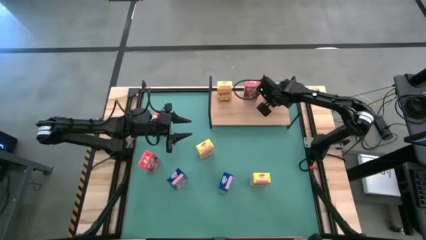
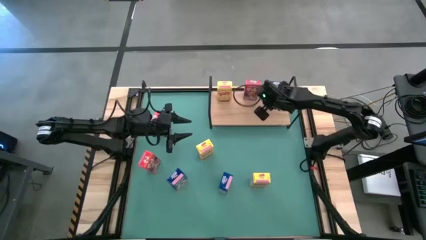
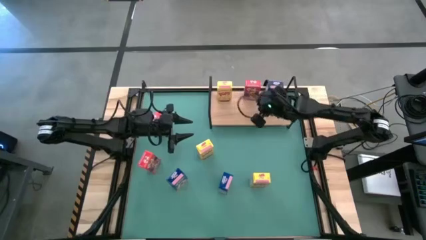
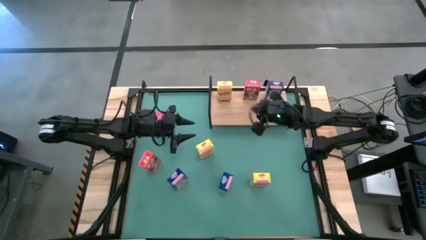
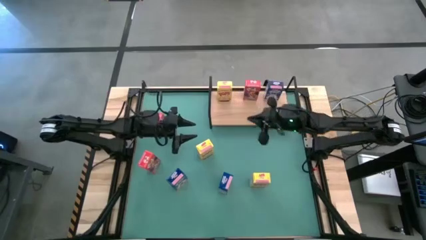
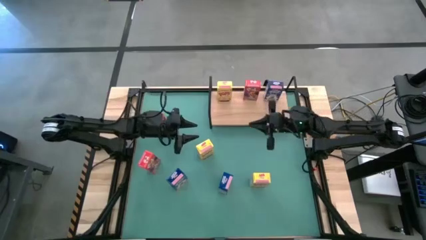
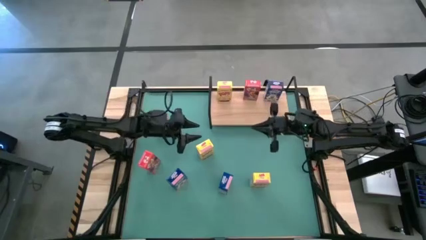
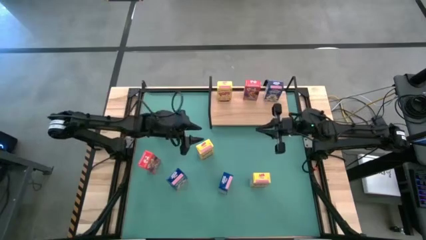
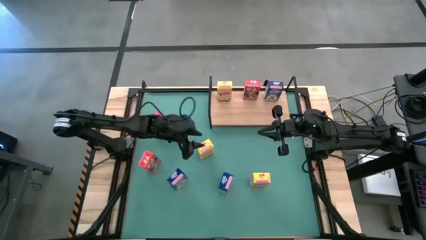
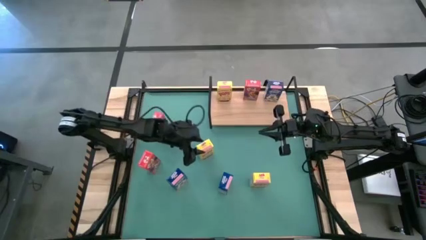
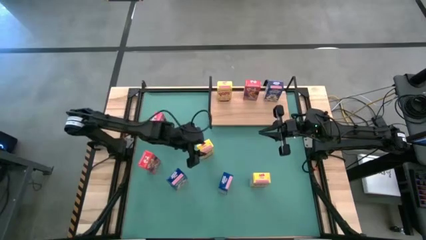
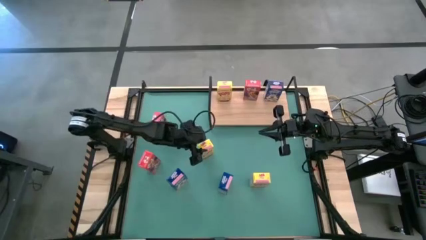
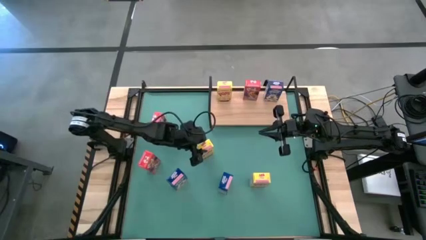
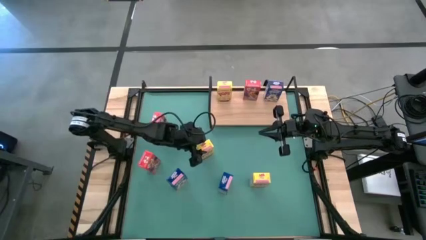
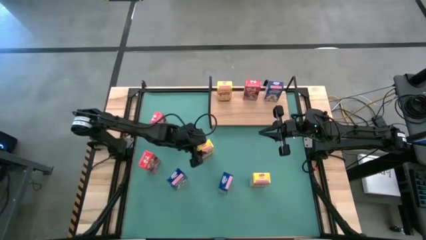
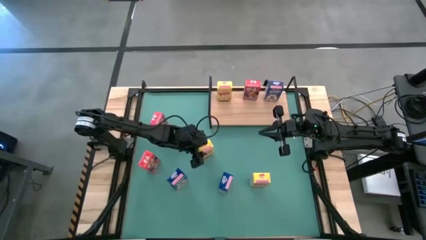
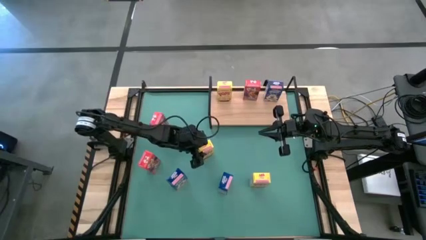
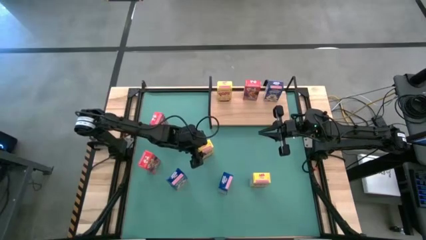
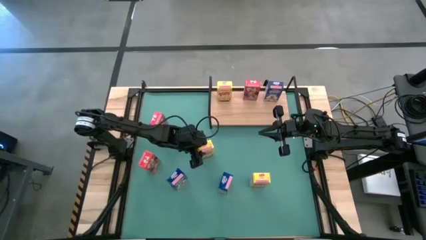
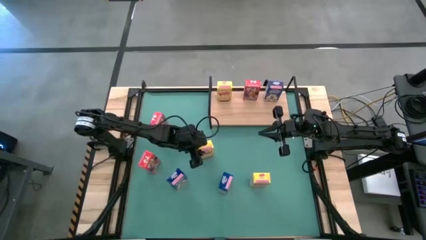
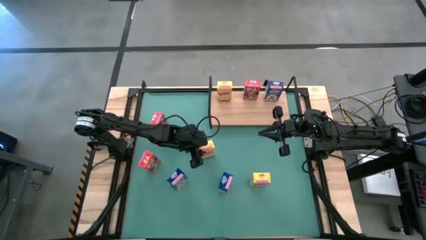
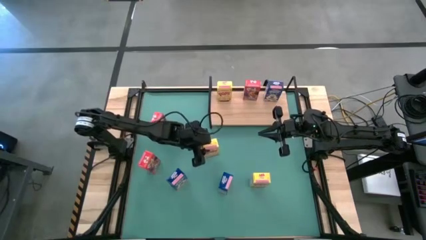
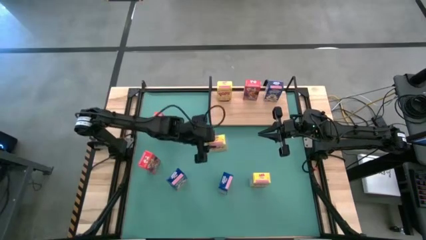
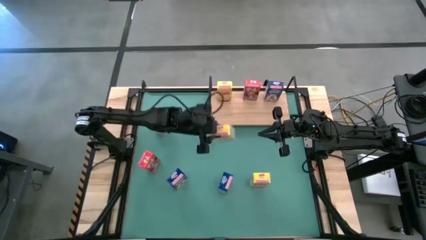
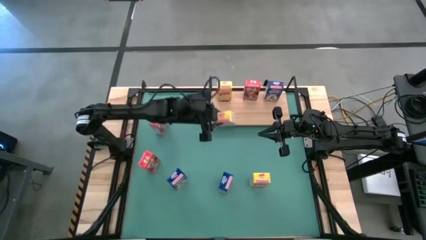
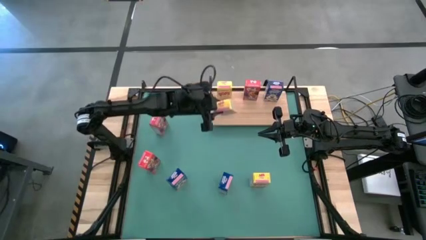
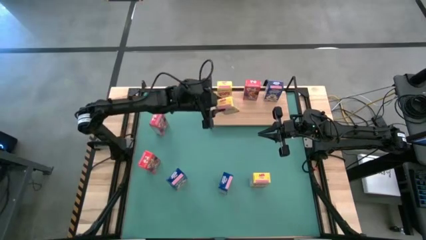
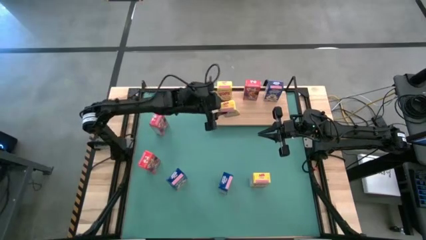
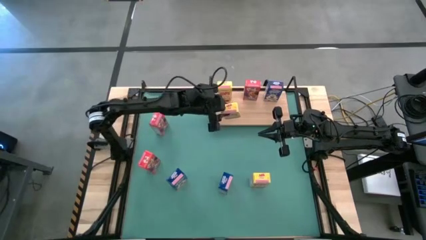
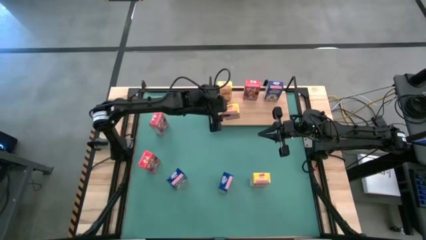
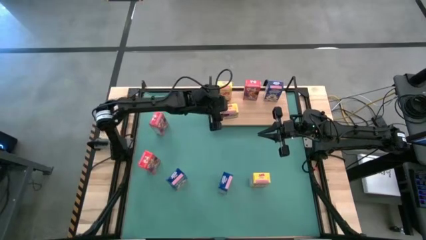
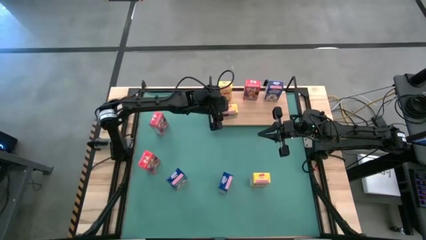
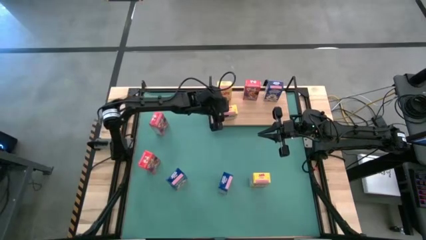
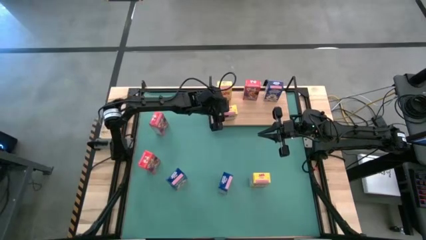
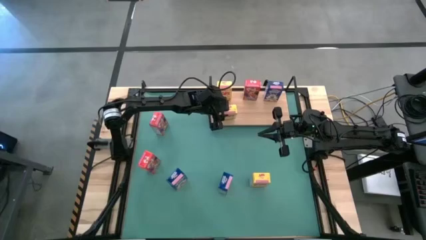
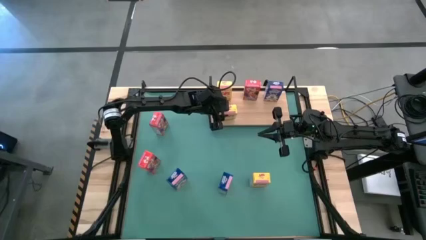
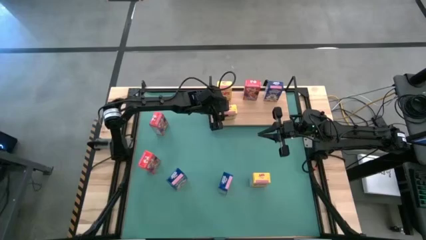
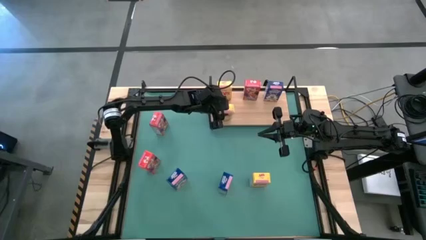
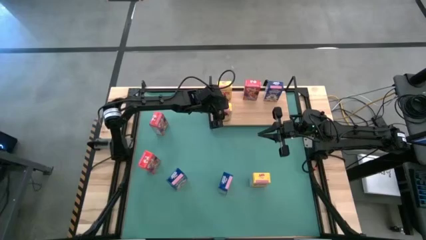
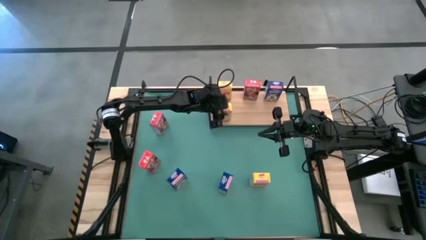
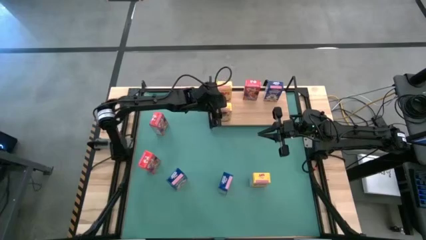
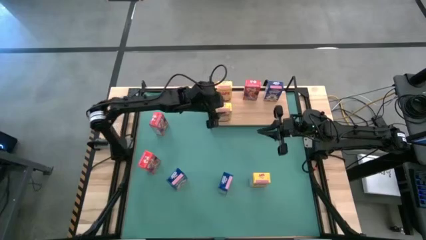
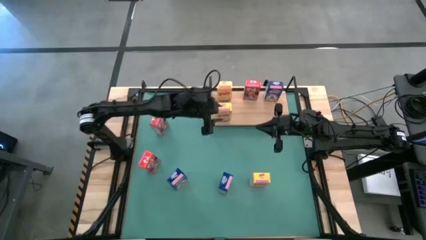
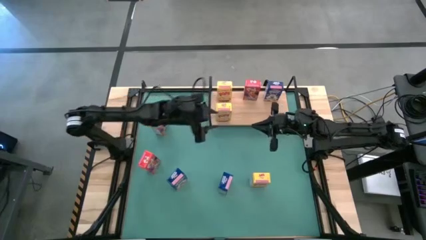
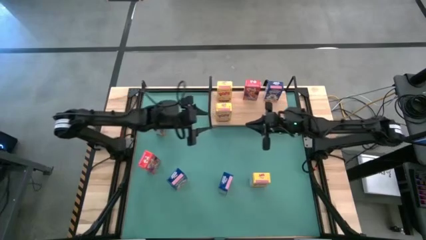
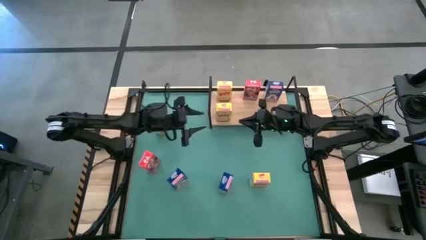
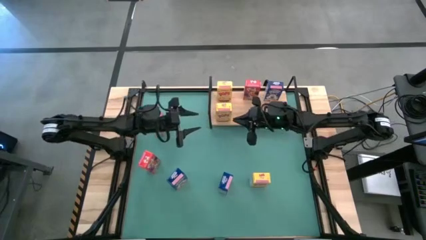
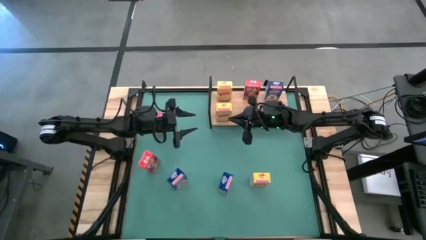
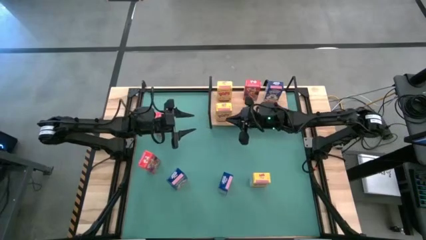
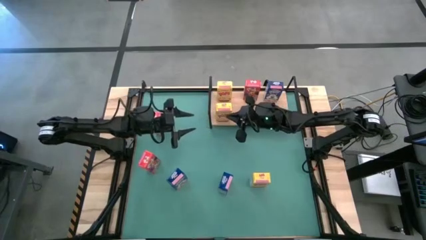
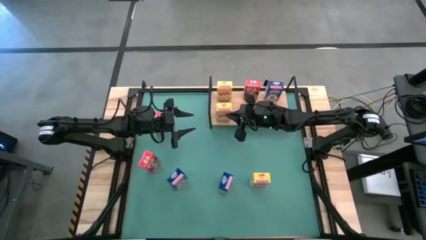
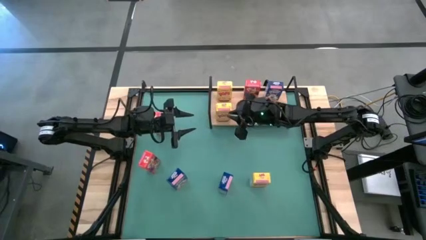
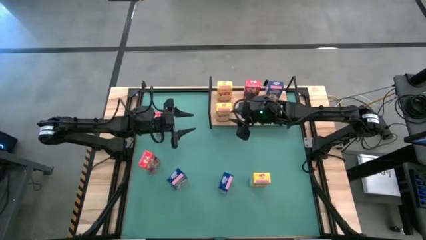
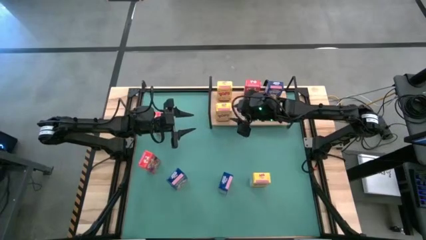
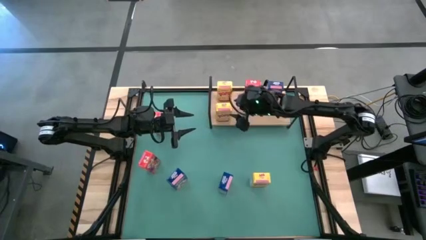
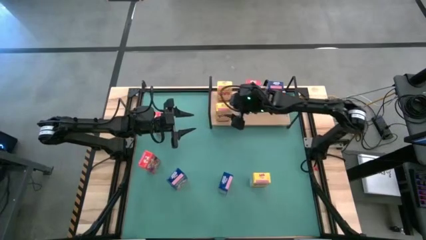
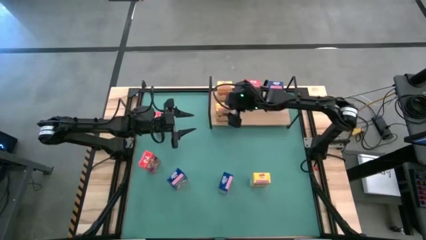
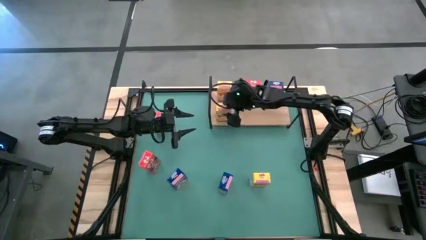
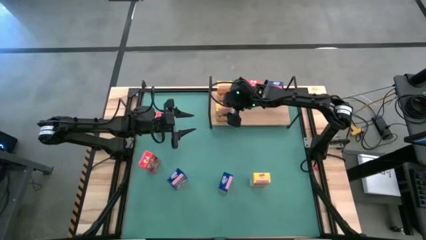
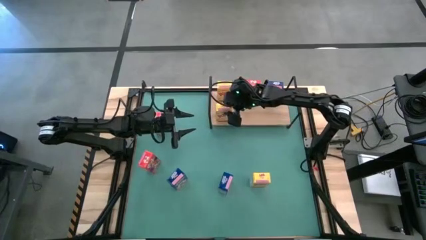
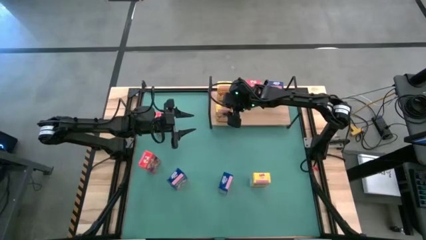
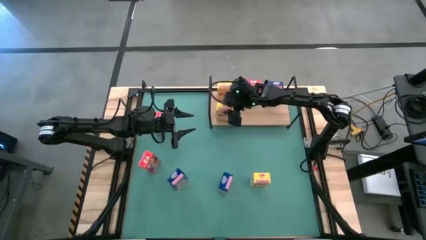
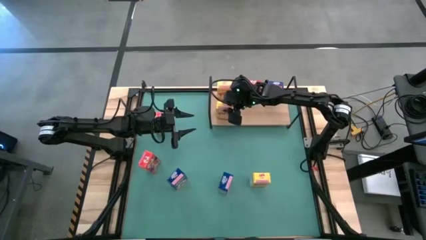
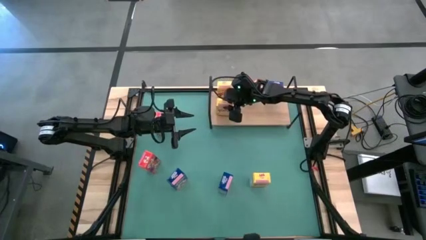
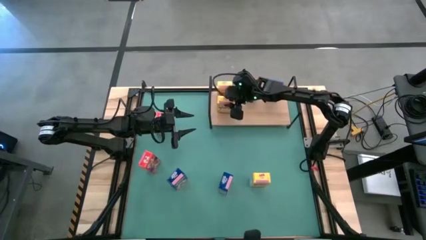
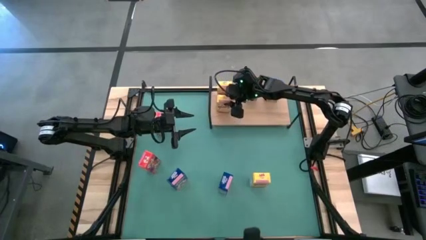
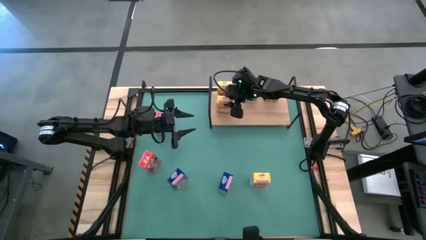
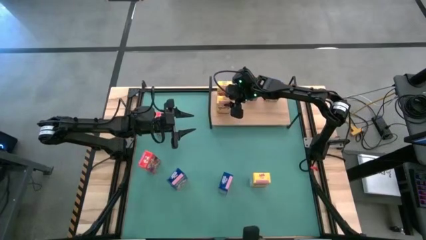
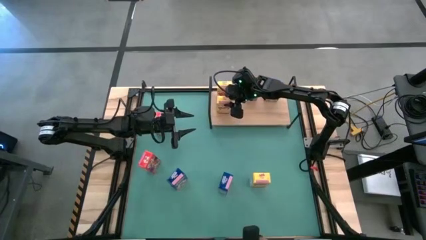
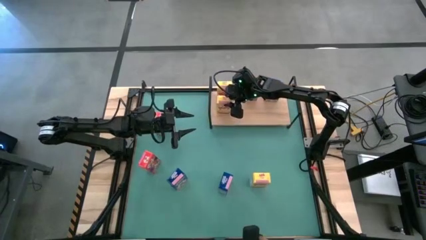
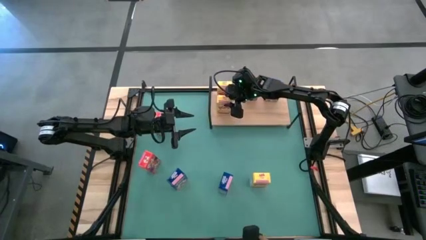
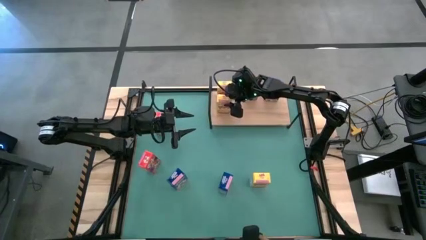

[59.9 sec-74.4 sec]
Task: Stack cereal on shelf
Put the left yellow cereal box on the shelf aligned with the other yellow cereal box

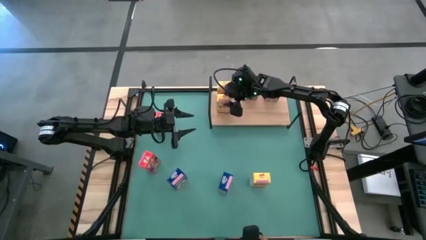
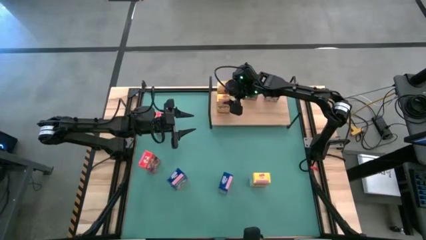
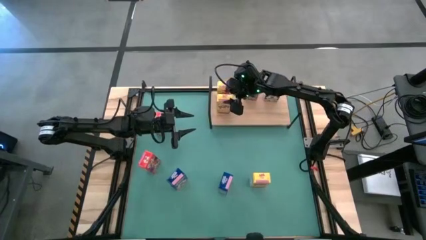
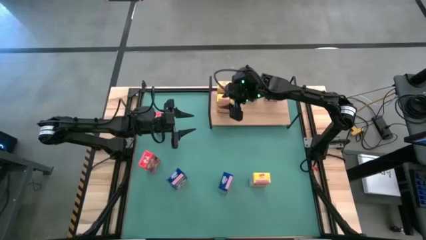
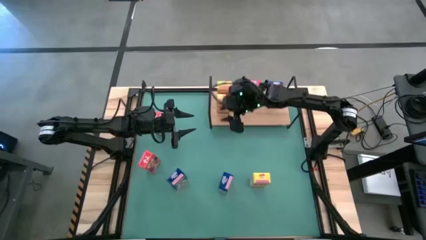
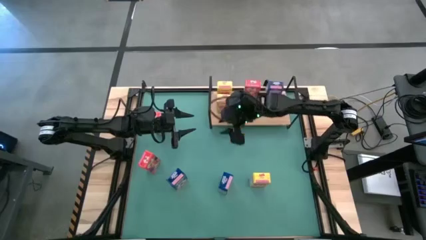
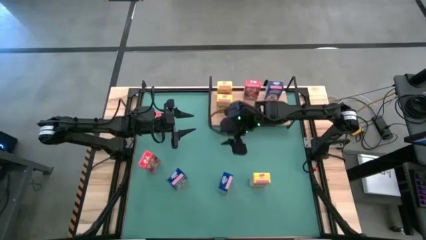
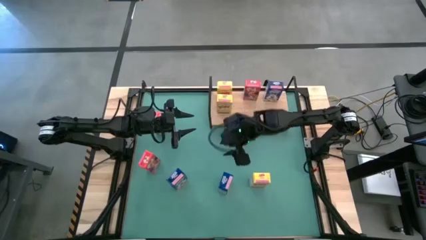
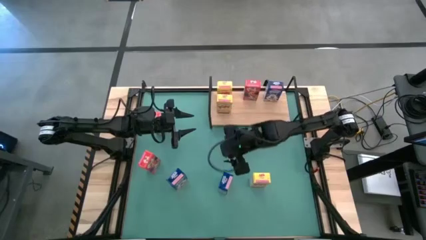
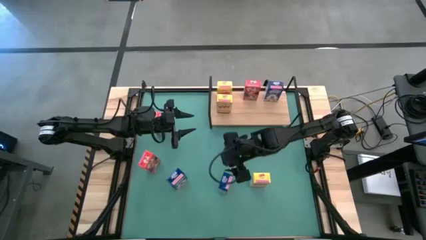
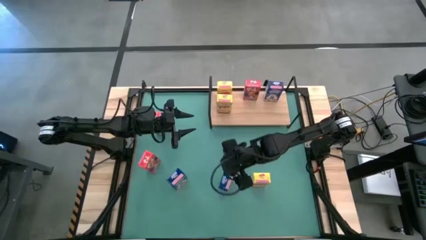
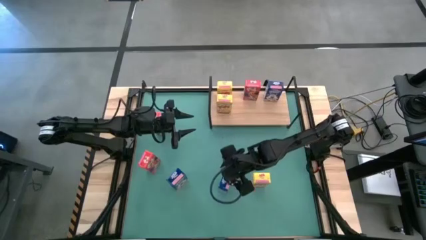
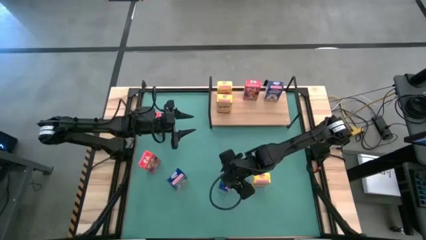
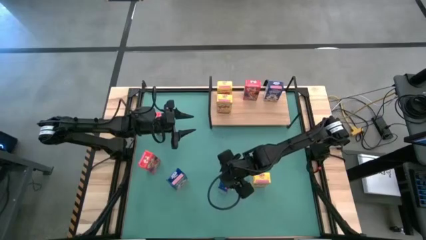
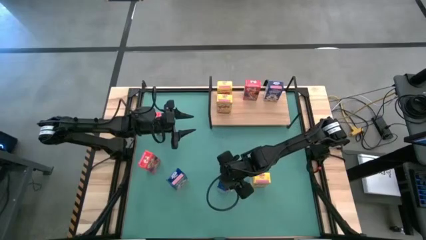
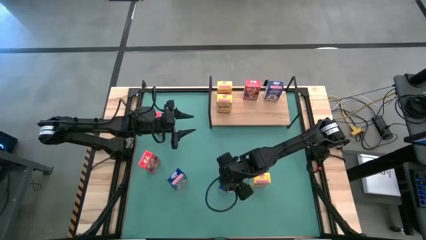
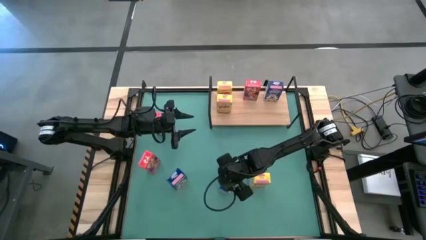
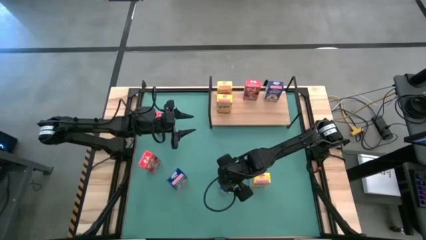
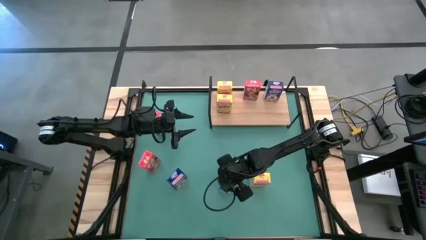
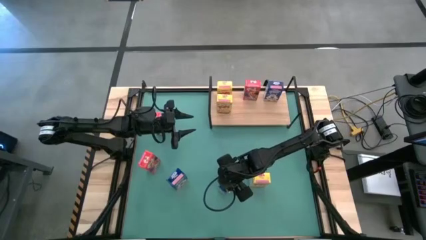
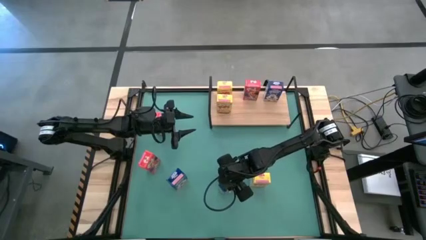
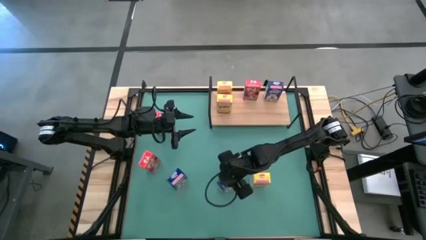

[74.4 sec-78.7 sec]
Put the right blue cereal box on the shelf aligned with the other blue cereal box
